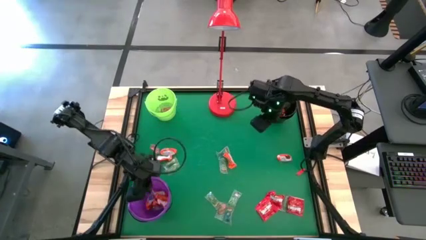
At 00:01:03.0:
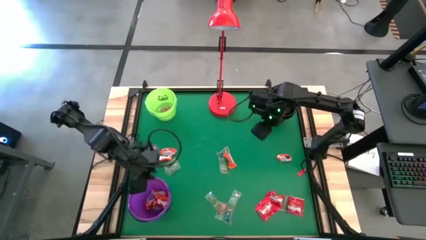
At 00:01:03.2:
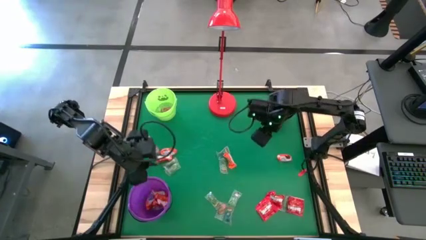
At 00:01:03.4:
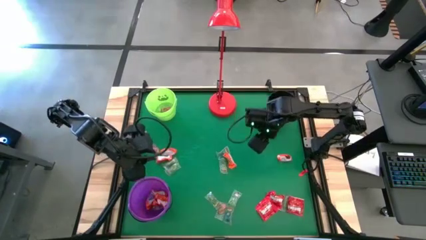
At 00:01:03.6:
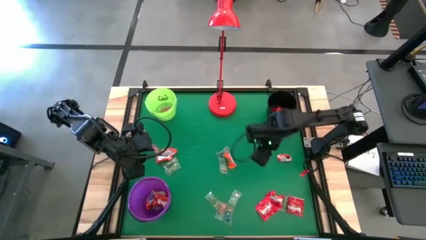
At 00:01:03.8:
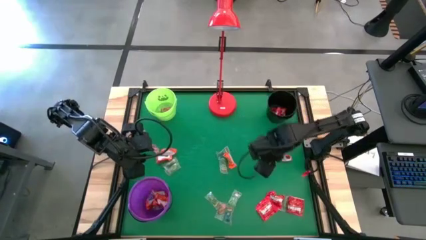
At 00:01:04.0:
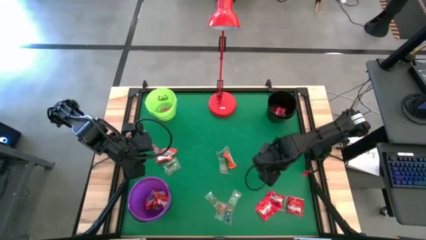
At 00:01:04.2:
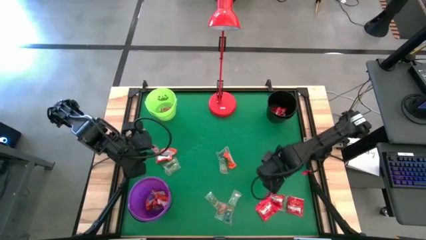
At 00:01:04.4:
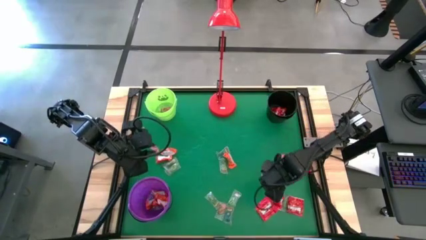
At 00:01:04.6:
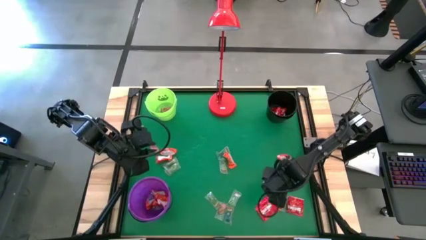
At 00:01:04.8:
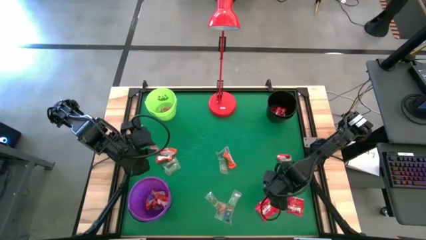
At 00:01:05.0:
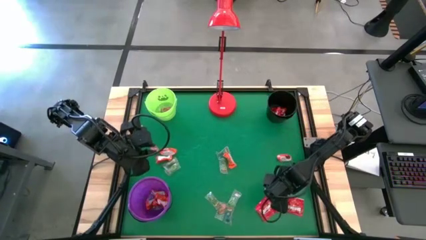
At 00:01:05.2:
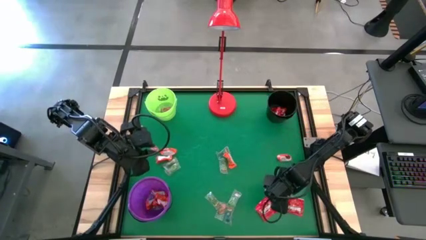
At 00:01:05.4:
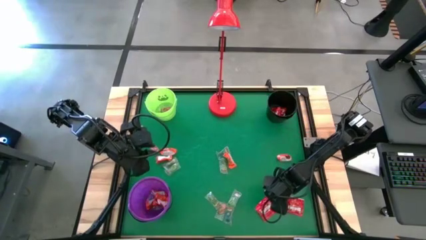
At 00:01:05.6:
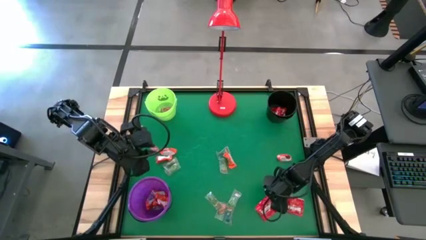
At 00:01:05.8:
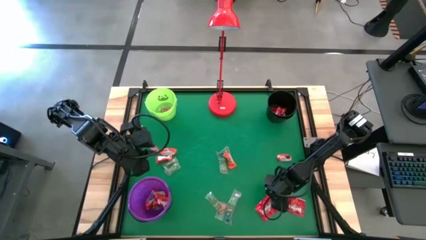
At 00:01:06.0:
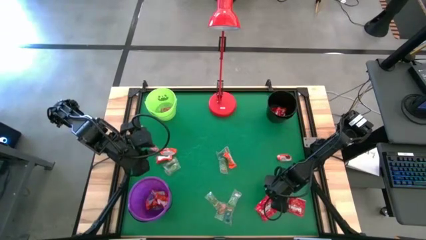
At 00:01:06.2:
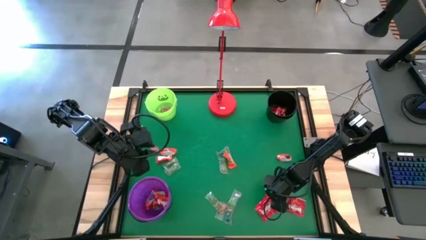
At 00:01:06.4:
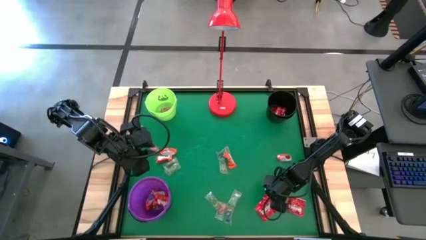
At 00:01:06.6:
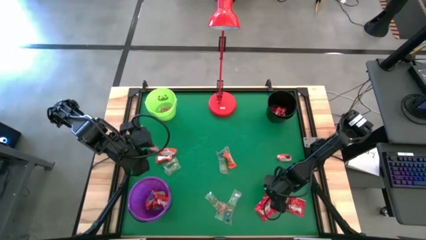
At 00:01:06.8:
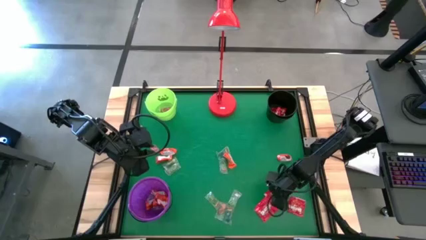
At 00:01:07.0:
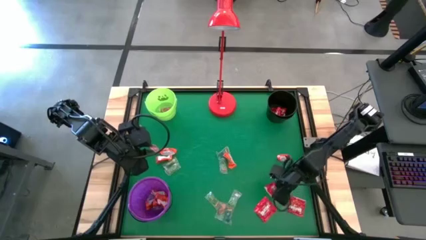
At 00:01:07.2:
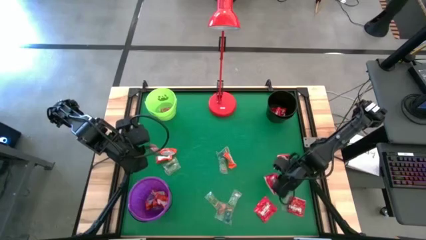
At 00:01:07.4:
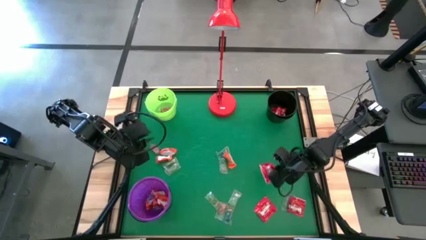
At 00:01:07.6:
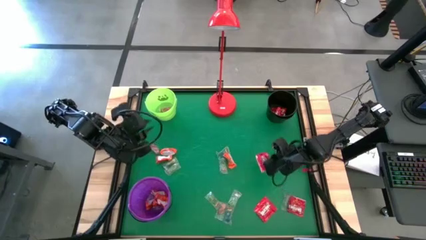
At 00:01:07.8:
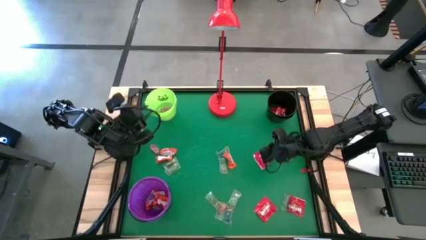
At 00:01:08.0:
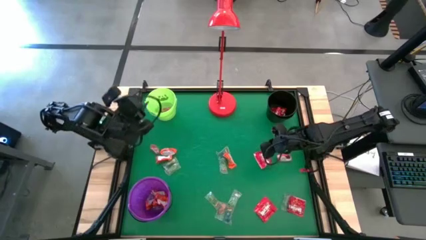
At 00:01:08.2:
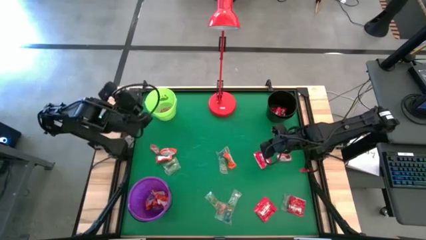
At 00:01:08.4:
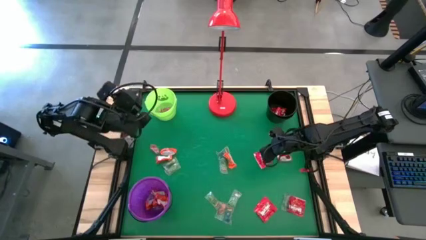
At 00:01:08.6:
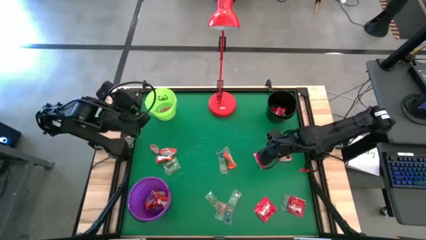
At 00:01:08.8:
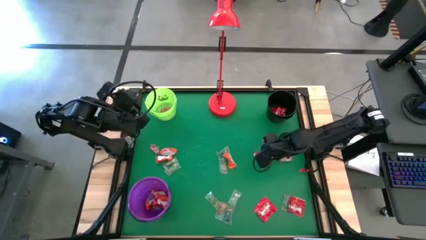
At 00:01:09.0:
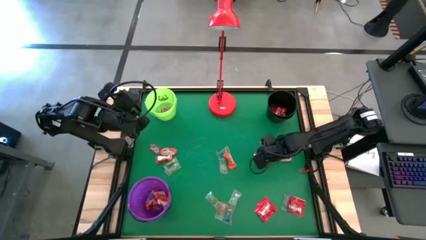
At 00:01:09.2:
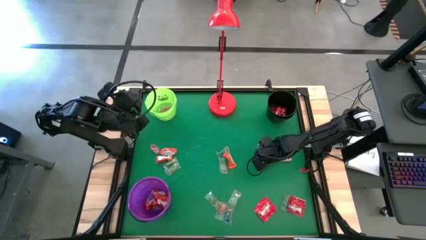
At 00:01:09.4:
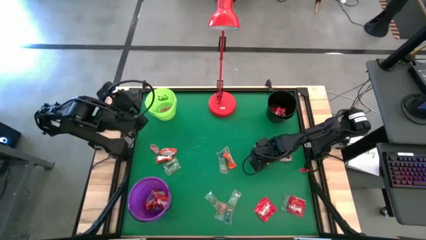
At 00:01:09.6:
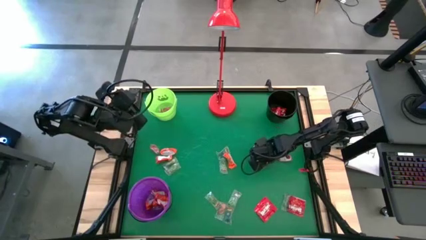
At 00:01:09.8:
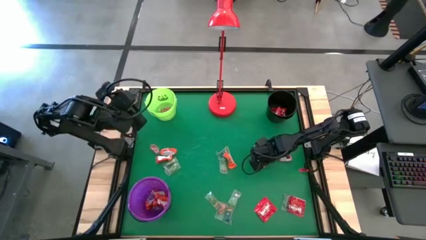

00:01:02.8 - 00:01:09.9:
Task: Sort candy
Put the red candy into the black bucket

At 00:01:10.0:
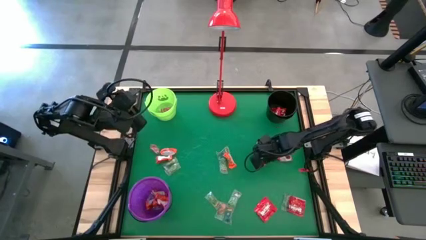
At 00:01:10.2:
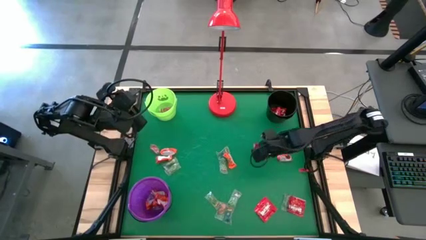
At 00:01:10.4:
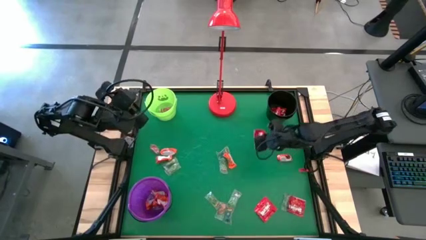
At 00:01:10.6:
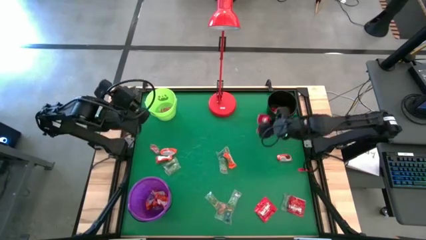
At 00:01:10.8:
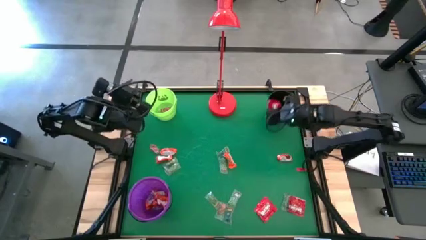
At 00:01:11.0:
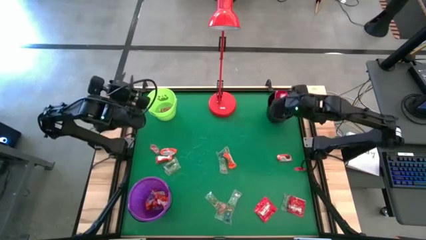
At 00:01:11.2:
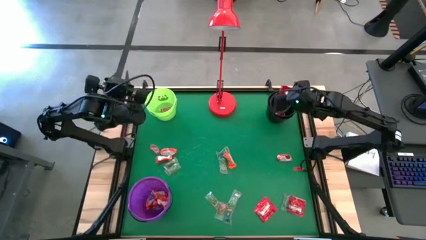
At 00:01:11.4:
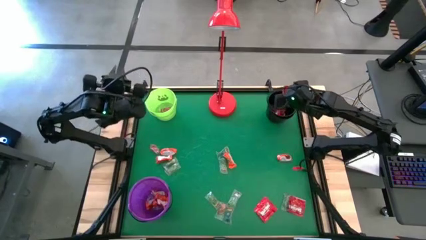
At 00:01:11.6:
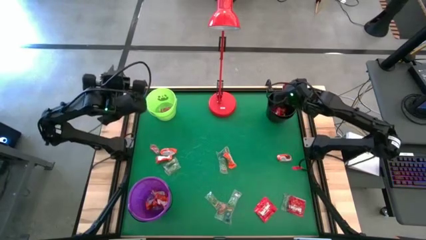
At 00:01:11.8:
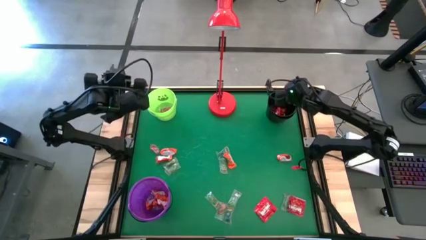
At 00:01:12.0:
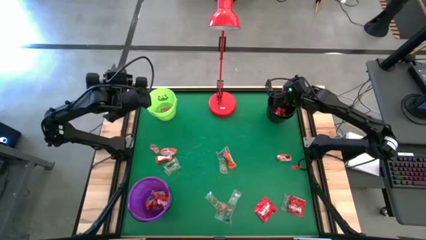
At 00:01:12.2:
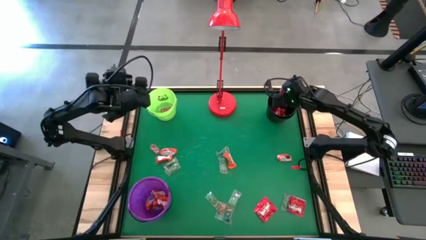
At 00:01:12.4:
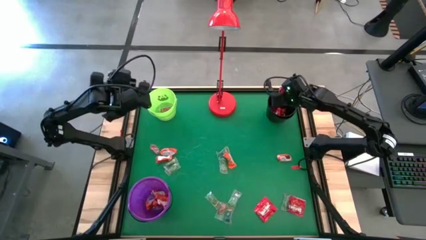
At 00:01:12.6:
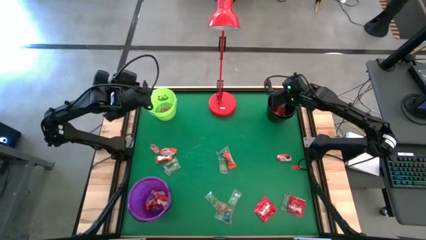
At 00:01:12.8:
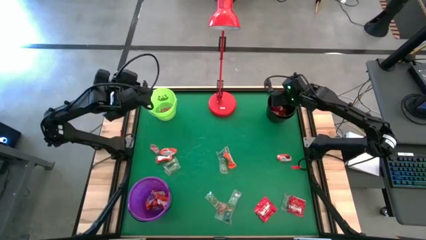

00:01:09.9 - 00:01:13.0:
Put the red candy into the black bucket

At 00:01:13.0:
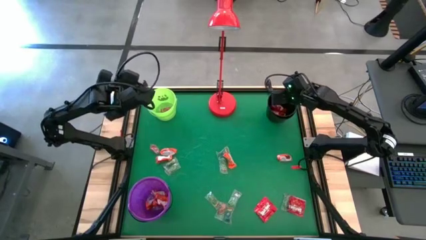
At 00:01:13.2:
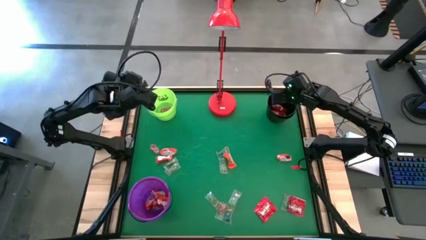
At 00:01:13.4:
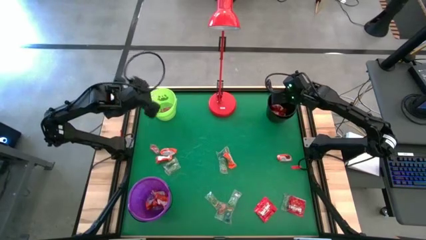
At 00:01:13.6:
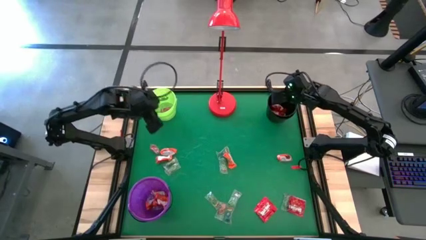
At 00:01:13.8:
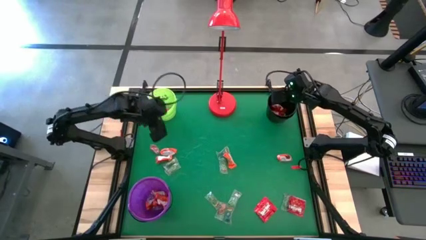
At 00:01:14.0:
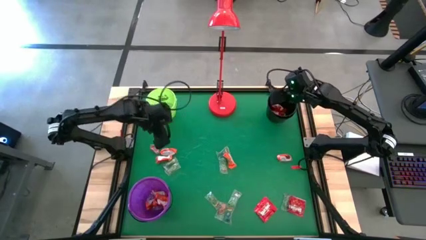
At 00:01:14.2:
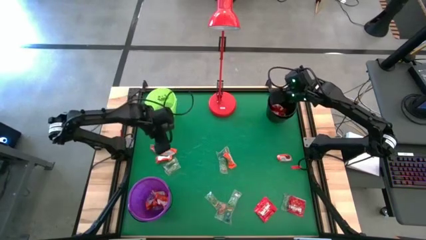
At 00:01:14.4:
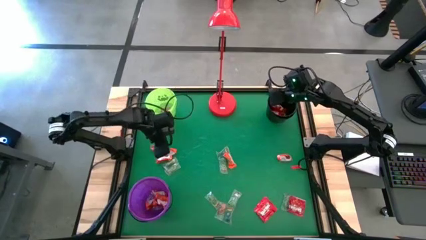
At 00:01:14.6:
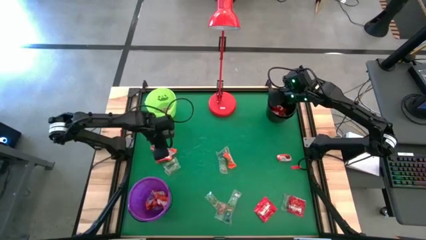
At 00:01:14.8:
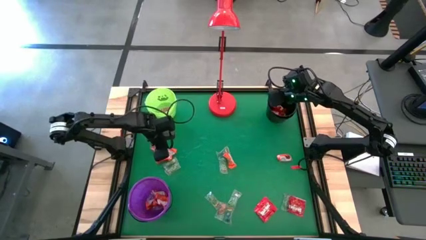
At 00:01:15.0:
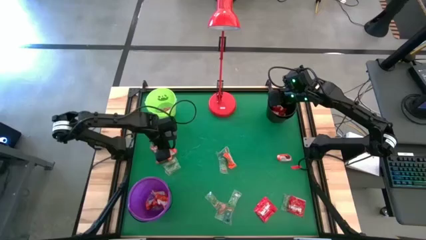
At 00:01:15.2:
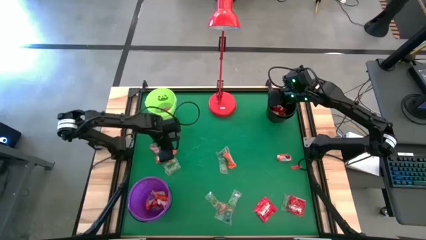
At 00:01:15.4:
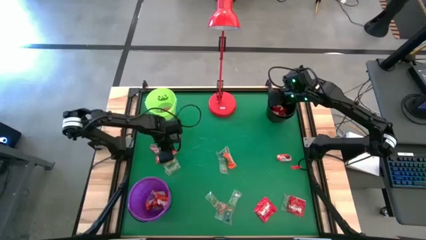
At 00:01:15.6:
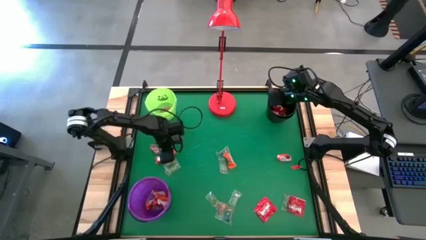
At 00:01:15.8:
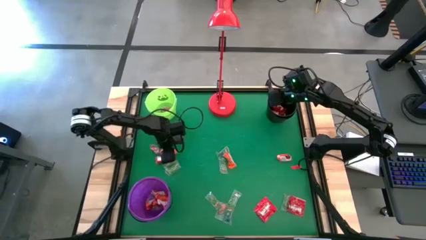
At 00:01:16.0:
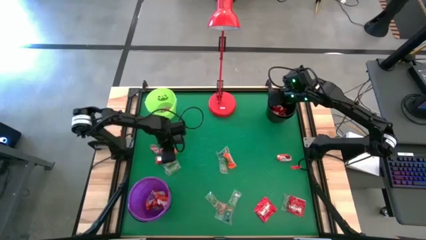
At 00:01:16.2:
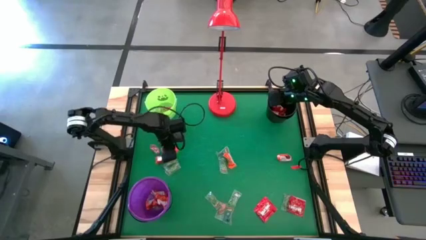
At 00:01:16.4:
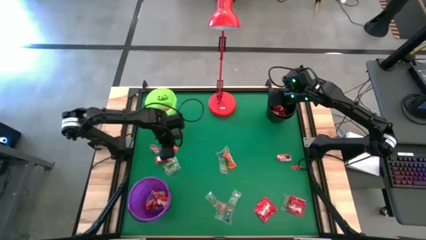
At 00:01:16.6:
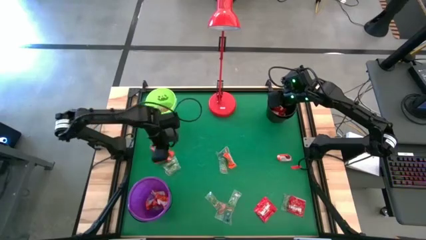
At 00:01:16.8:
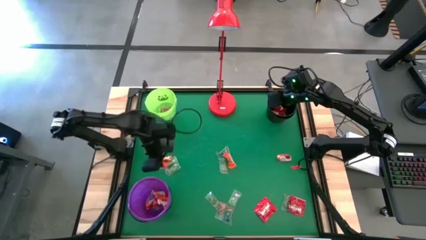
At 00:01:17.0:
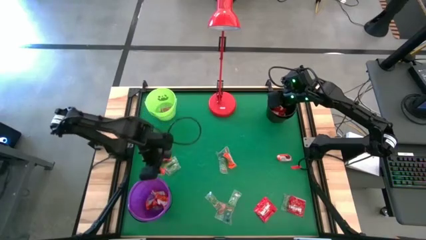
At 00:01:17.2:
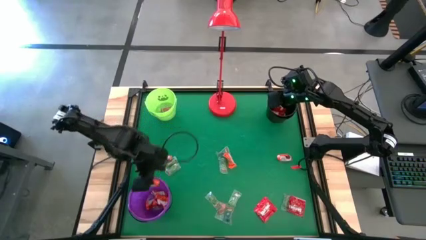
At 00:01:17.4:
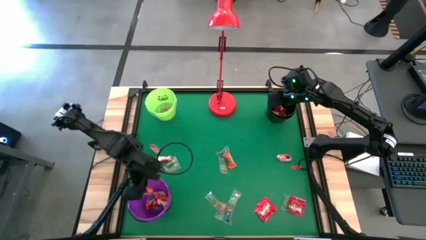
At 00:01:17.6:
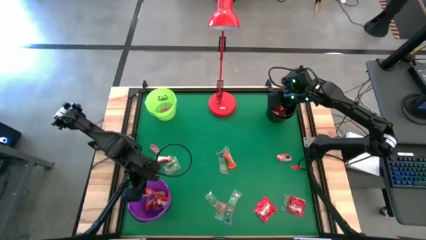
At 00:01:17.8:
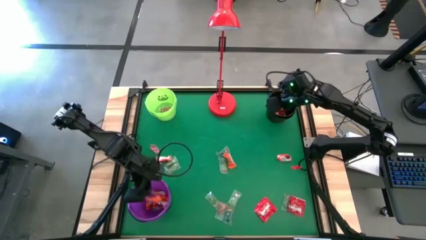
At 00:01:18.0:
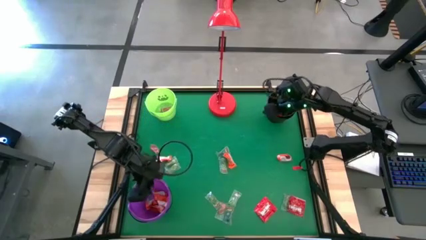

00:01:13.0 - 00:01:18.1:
Put the orange candy into the violet bucket
